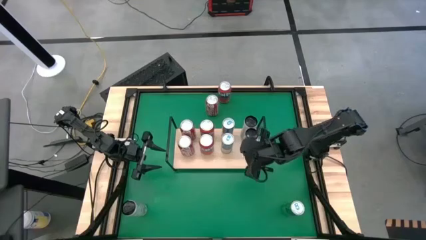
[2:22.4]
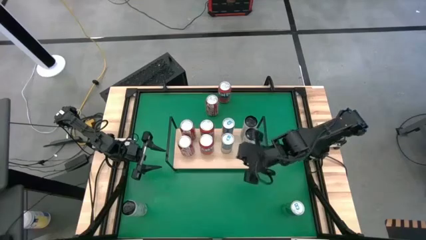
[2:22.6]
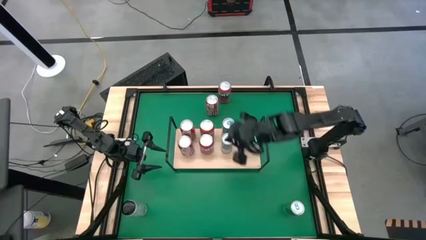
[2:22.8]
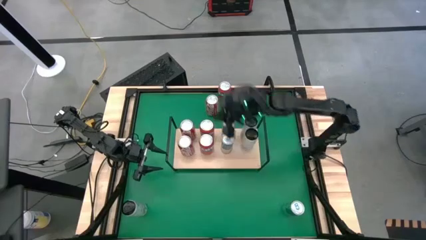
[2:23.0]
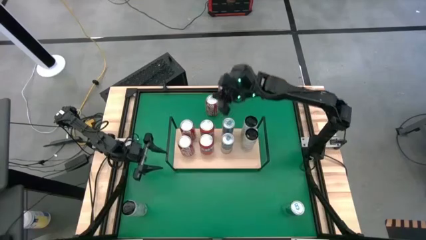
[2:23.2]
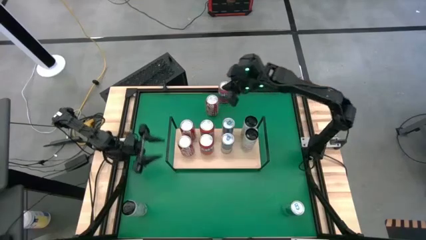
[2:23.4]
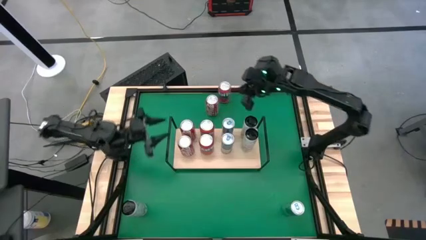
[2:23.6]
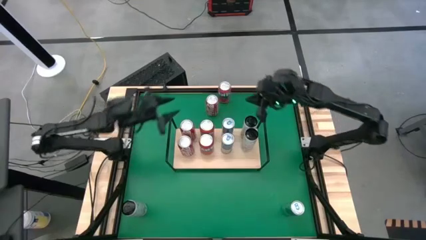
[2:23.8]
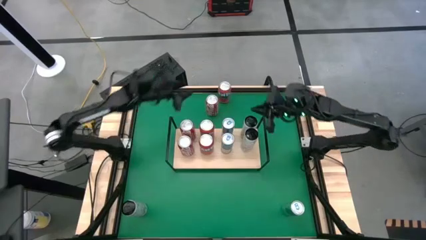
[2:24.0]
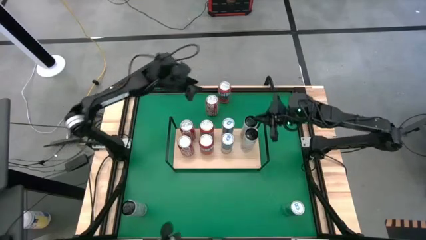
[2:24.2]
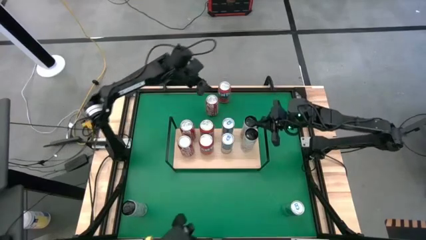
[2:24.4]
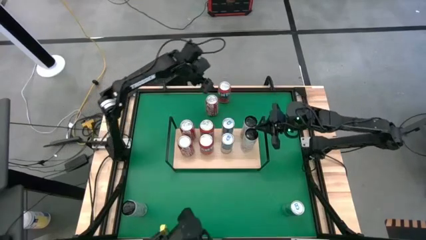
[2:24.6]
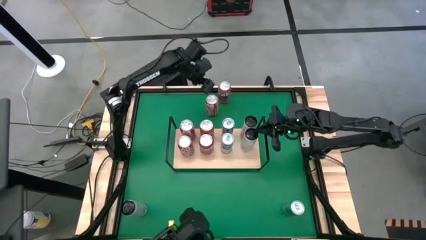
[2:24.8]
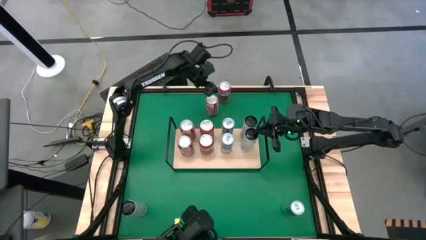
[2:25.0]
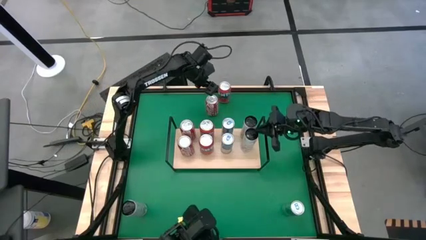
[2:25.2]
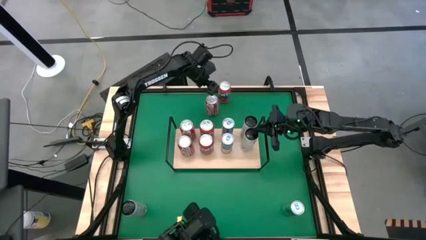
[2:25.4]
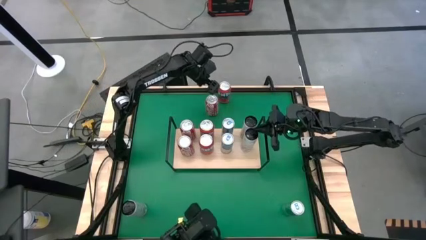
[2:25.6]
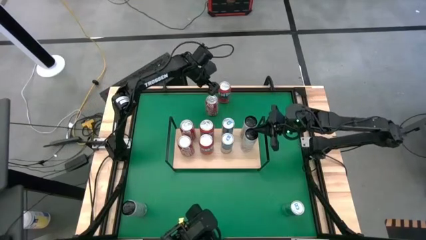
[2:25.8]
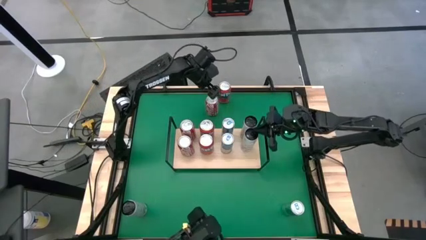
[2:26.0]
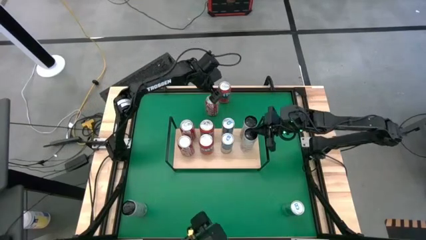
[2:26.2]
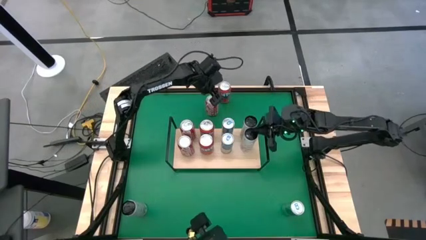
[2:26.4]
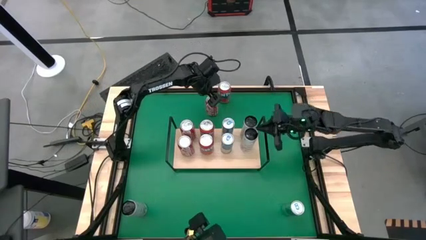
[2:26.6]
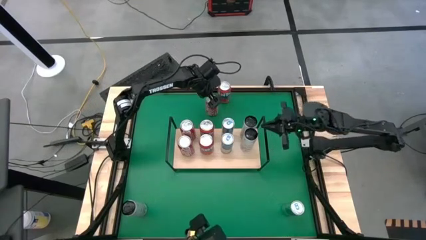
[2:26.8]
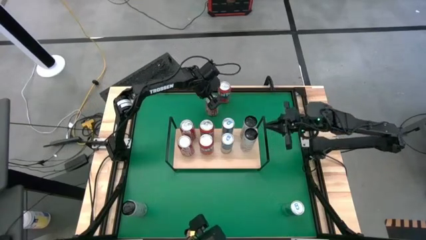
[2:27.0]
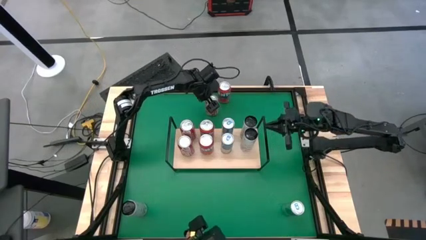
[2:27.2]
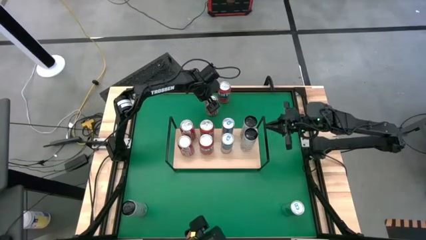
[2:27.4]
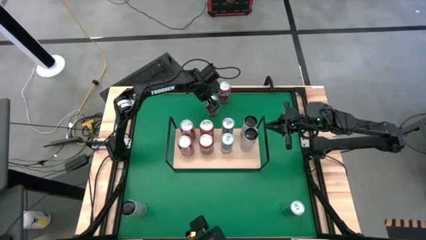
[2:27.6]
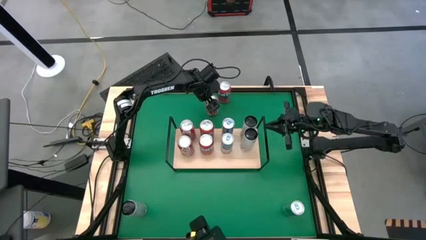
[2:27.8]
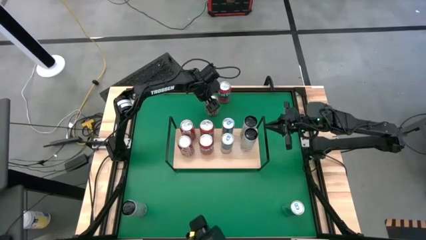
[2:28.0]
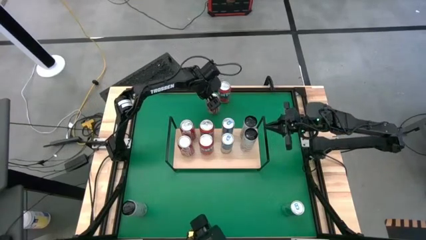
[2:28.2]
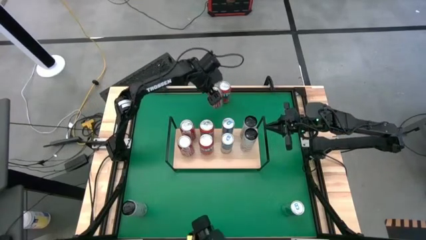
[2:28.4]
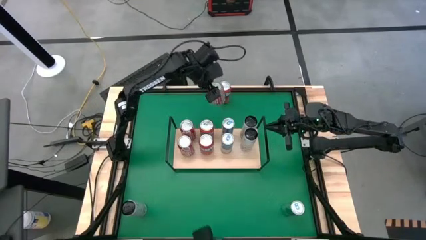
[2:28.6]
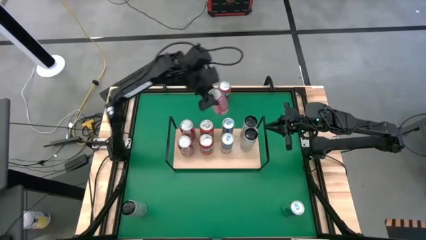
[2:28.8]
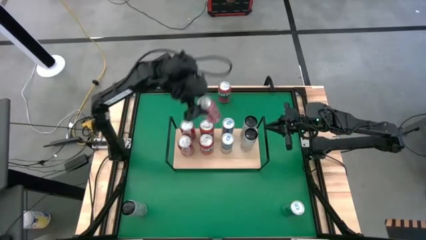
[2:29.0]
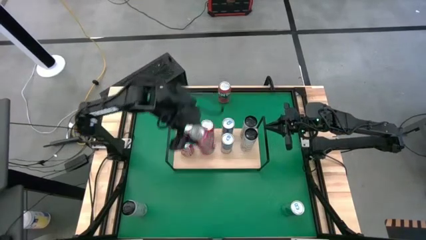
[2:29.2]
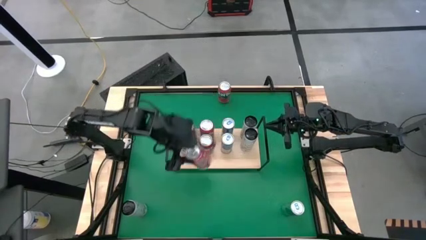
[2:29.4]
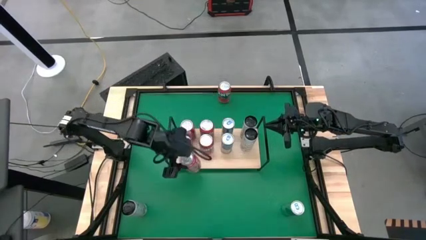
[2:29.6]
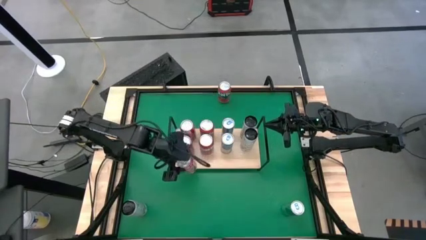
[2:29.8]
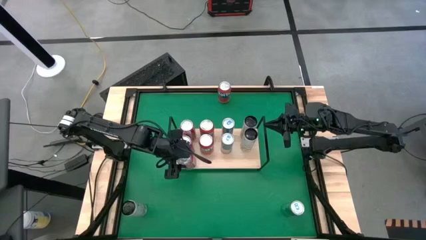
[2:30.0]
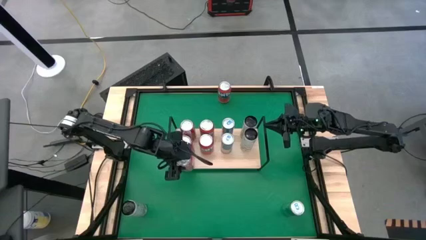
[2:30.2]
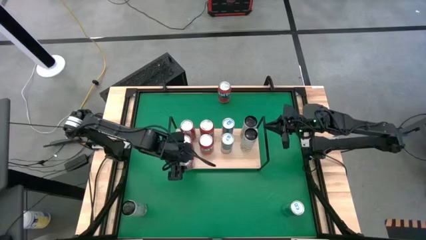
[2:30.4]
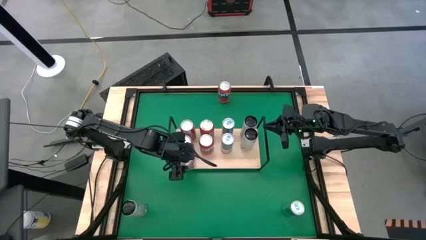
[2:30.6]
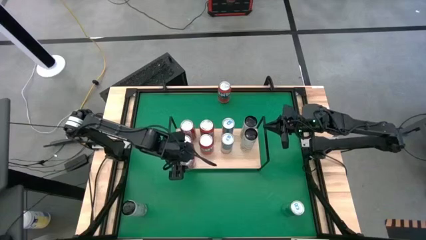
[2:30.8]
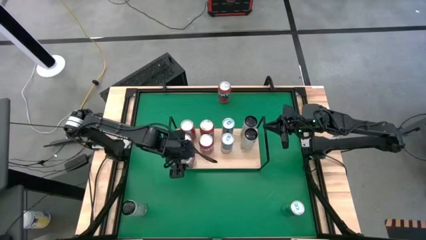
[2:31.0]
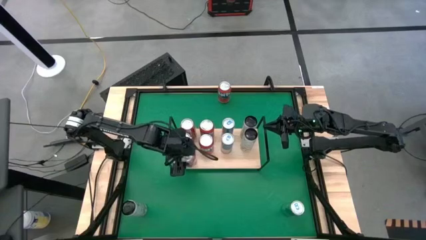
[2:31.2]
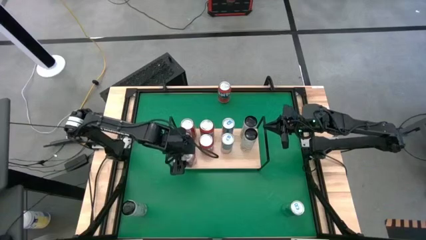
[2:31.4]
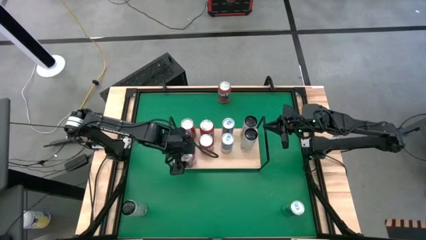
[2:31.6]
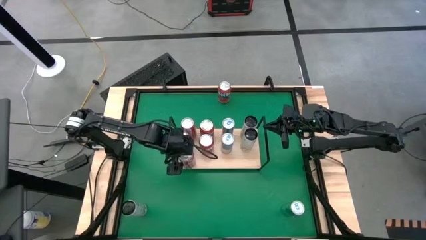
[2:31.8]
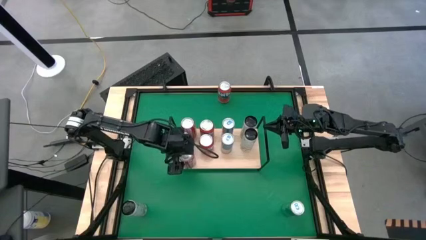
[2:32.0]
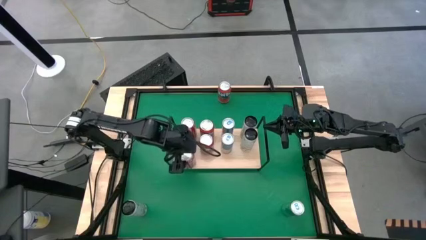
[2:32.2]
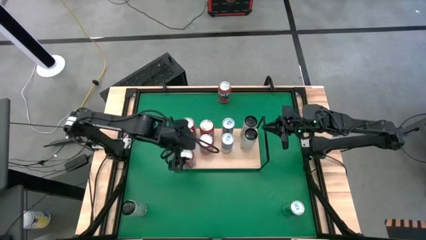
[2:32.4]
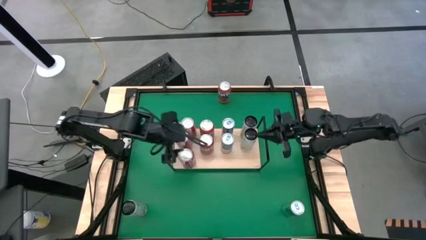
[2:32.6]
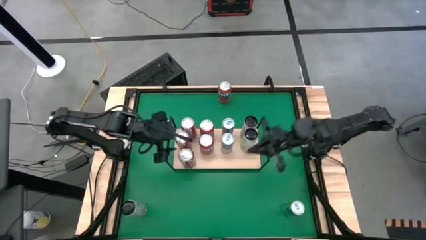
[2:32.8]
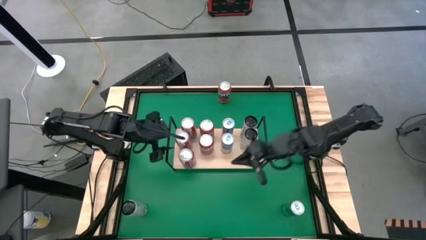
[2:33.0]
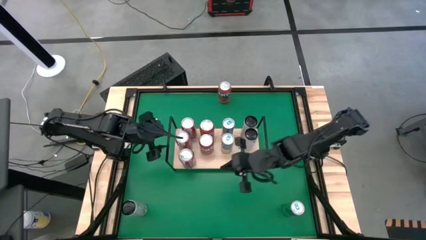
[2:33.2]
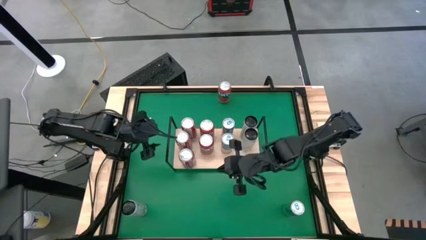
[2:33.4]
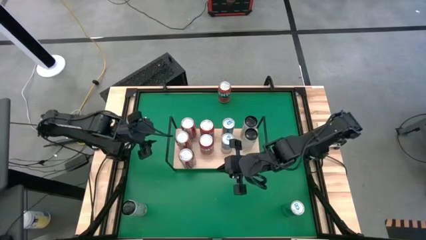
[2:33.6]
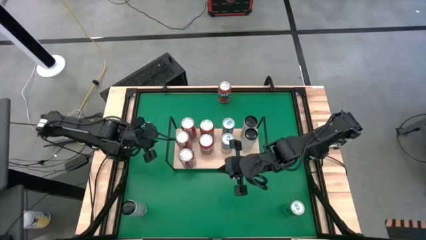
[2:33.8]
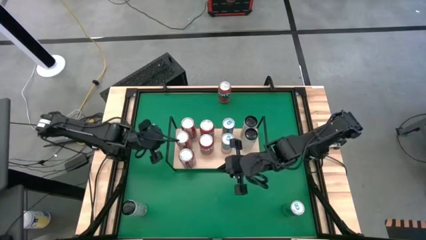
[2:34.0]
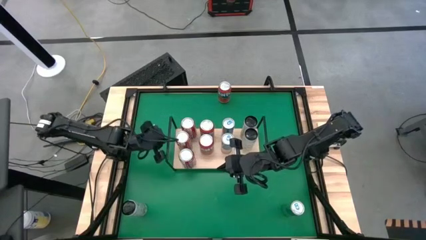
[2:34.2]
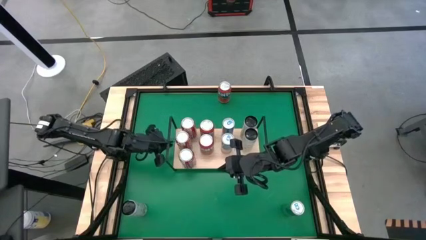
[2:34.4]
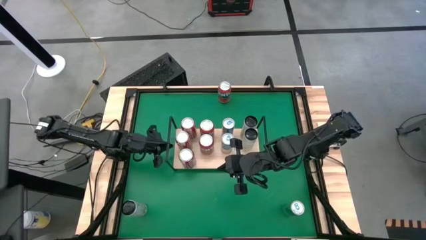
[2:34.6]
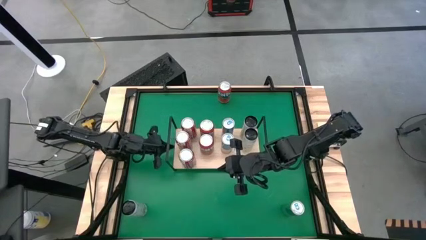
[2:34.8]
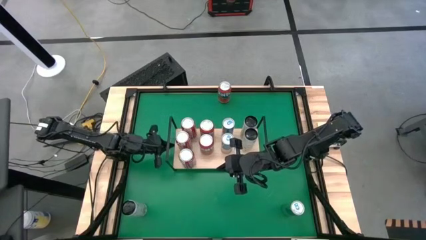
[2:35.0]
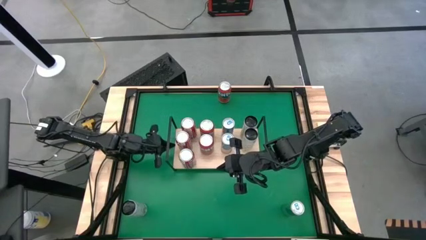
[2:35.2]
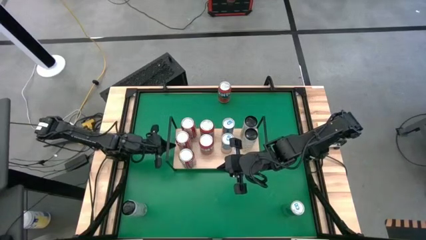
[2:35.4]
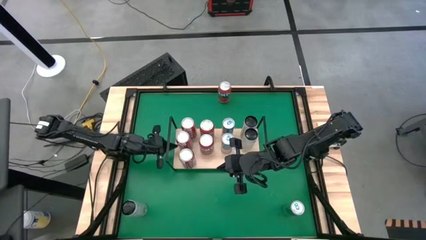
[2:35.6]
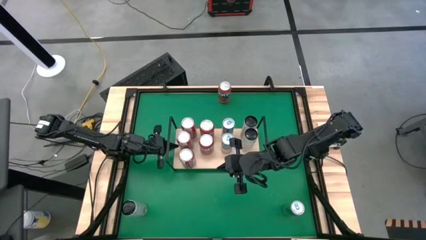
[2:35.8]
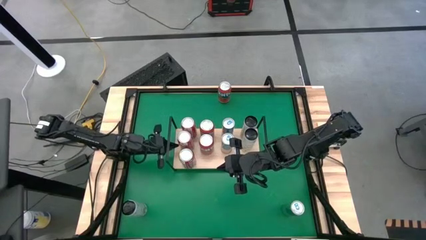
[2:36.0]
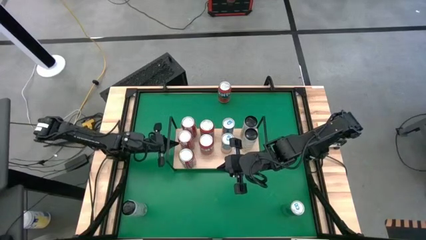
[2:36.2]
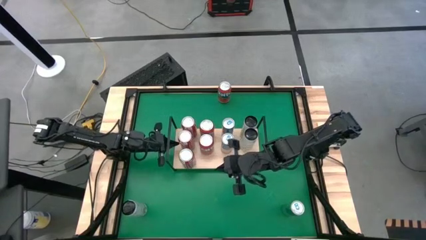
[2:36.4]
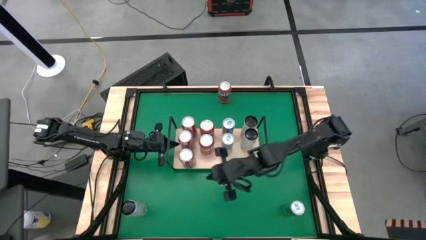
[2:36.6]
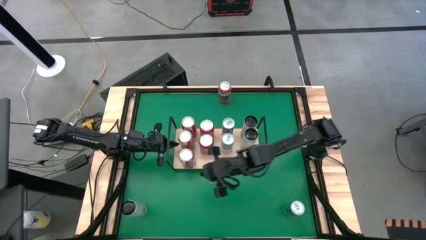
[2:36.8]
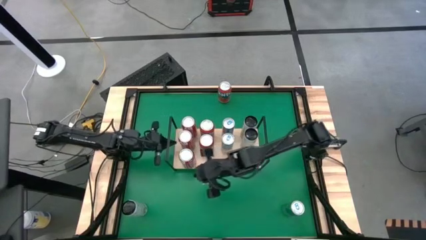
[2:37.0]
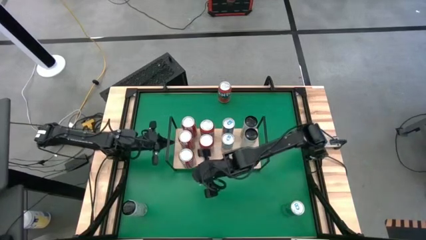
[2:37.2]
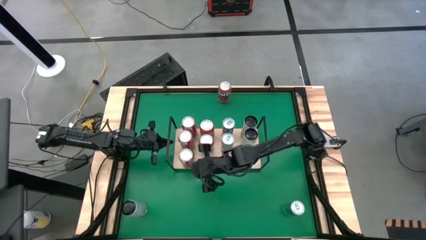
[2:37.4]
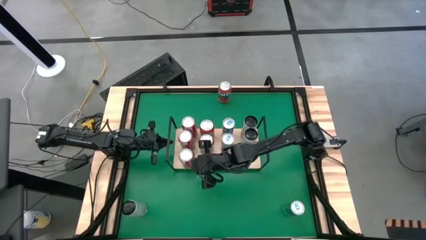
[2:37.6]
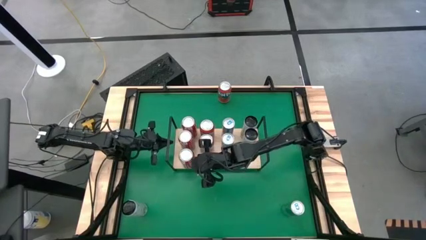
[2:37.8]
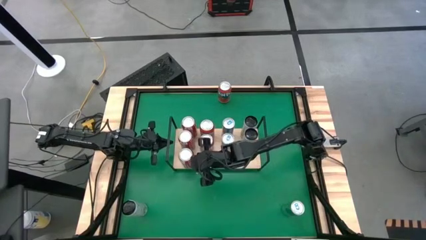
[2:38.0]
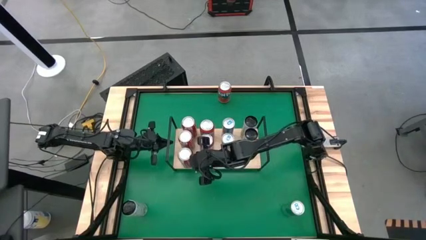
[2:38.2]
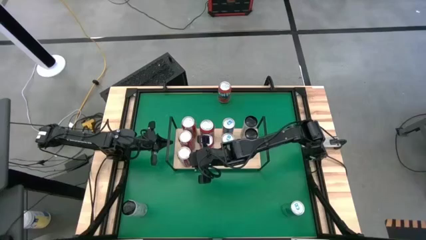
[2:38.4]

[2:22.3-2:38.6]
Task: Place canned beverage on shelf
Put the red-white soda can on the shelf aligned with the other red-white soda cans

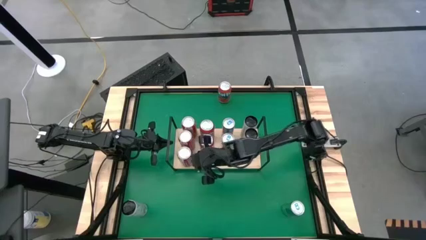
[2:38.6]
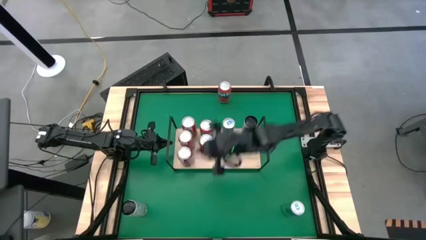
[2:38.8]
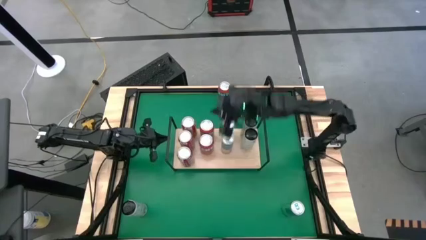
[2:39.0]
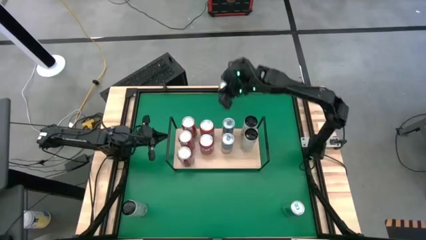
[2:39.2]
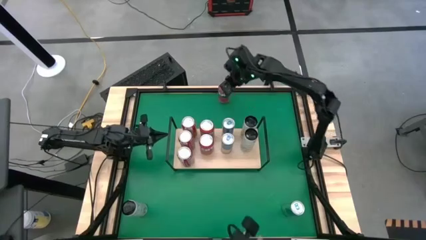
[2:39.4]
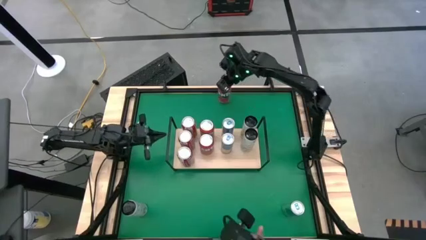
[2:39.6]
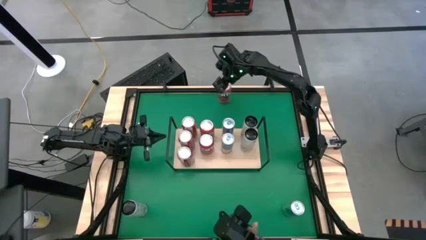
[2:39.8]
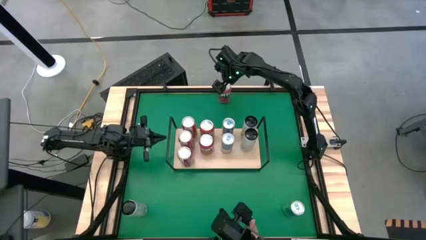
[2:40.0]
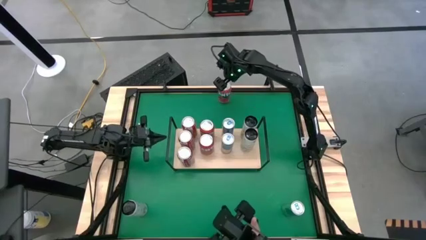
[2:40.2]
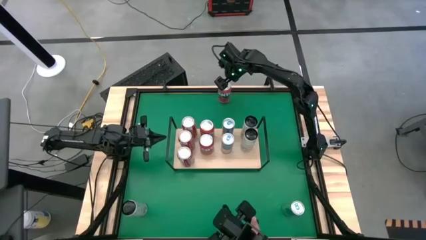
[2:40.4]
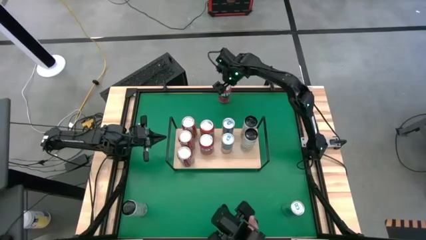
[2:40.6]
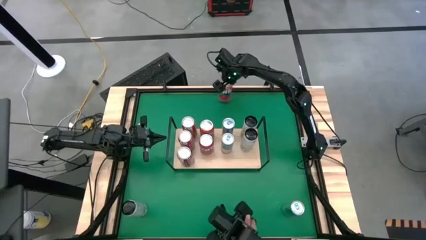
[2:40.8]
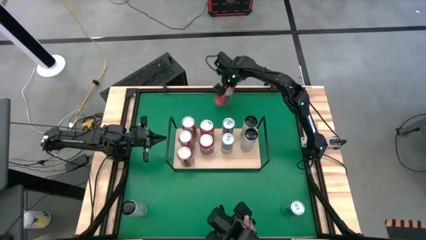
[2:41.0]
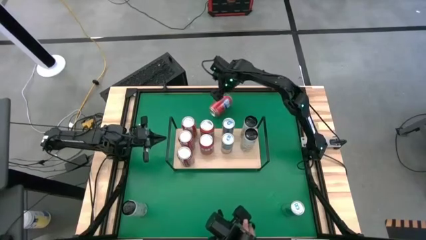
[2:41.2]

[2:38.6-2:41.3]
Put the orange soda can on the shelf aligned with the other orange soda cans
